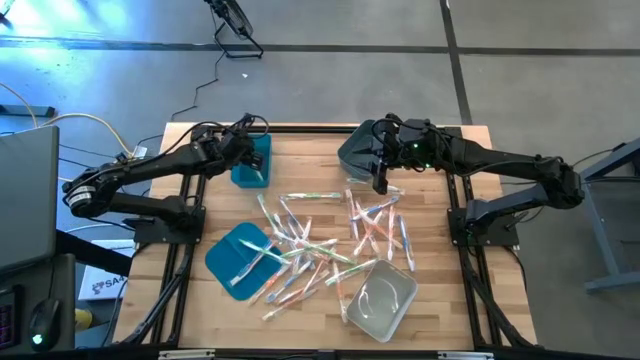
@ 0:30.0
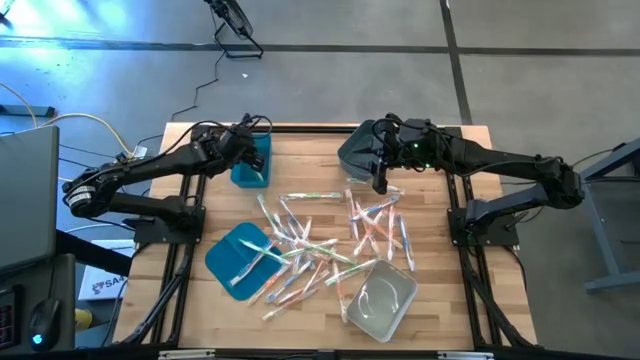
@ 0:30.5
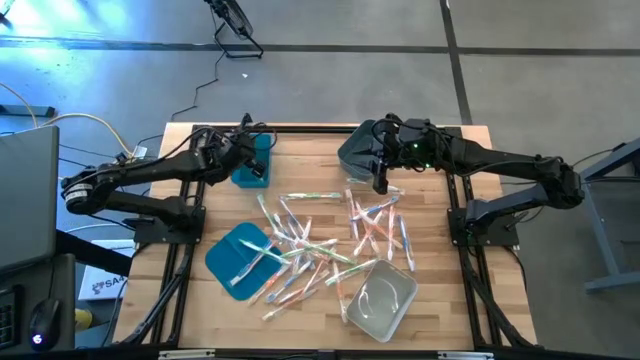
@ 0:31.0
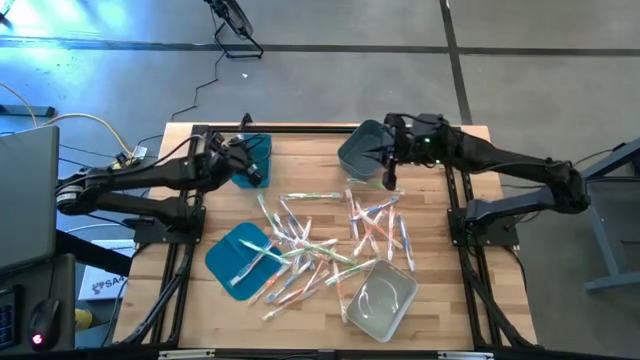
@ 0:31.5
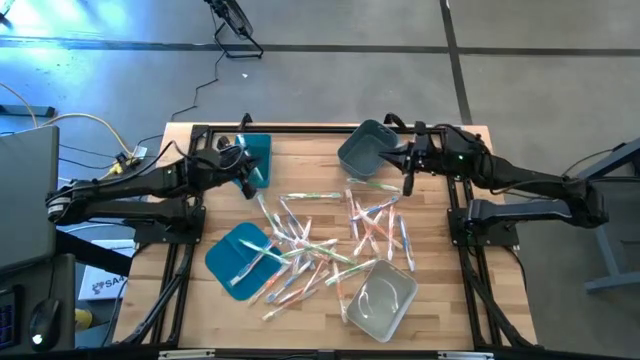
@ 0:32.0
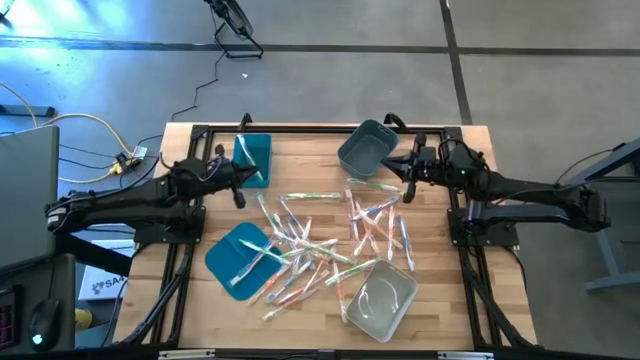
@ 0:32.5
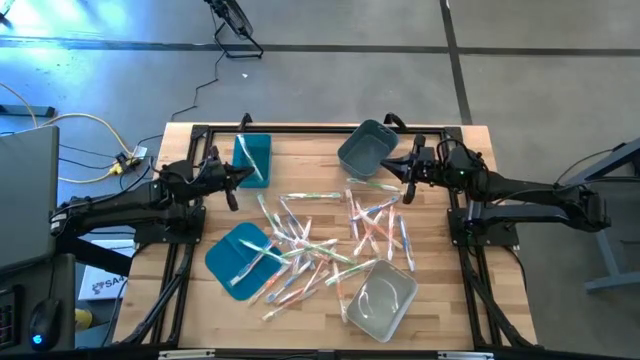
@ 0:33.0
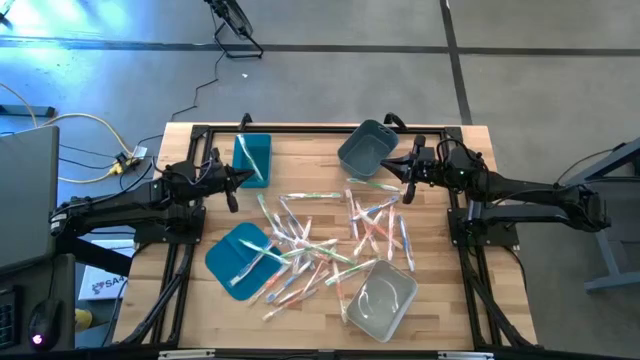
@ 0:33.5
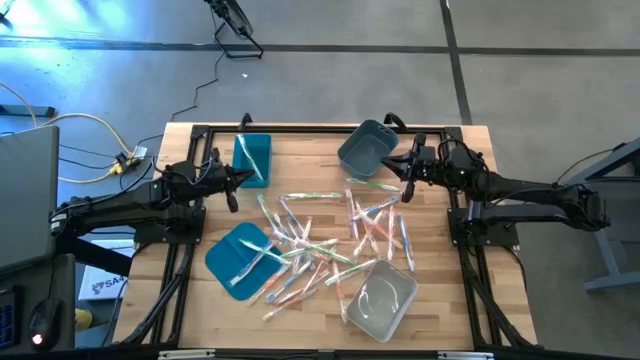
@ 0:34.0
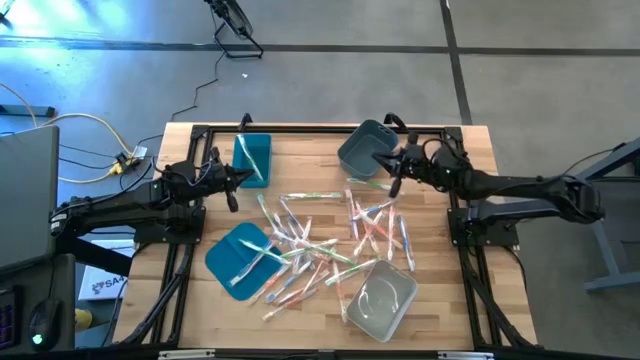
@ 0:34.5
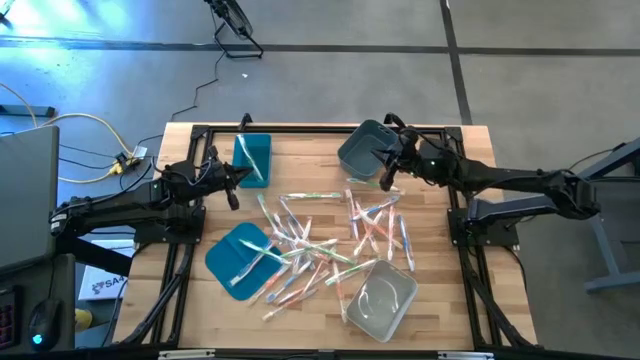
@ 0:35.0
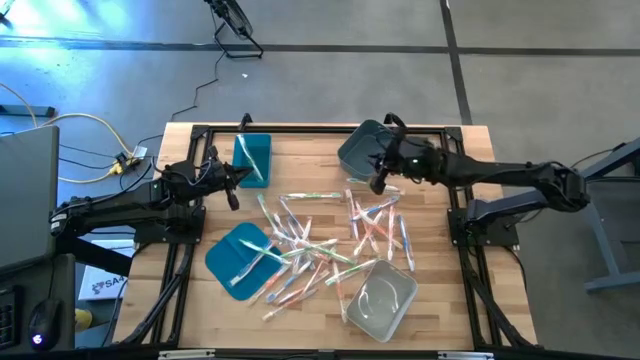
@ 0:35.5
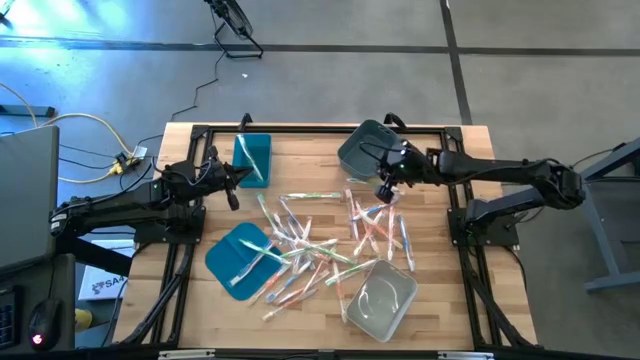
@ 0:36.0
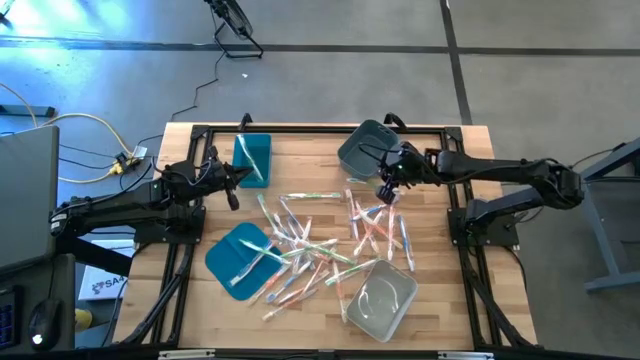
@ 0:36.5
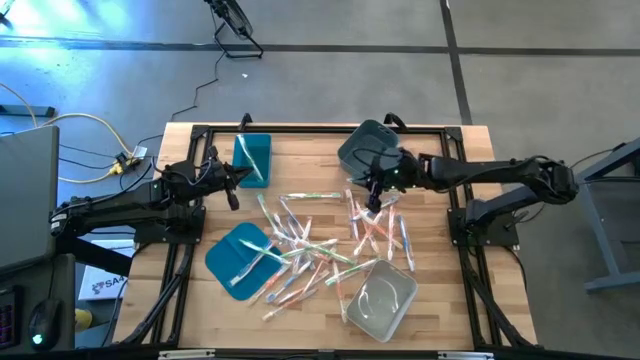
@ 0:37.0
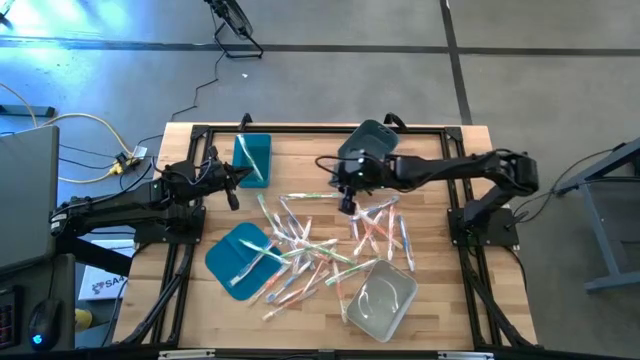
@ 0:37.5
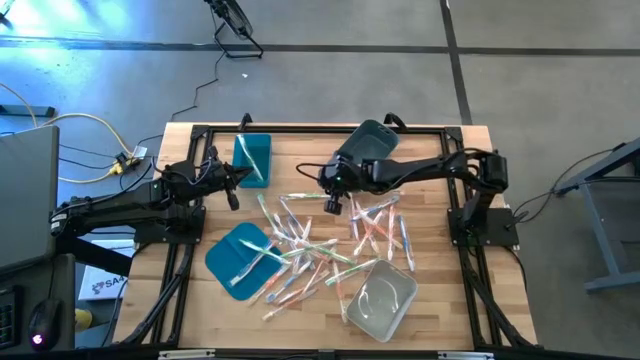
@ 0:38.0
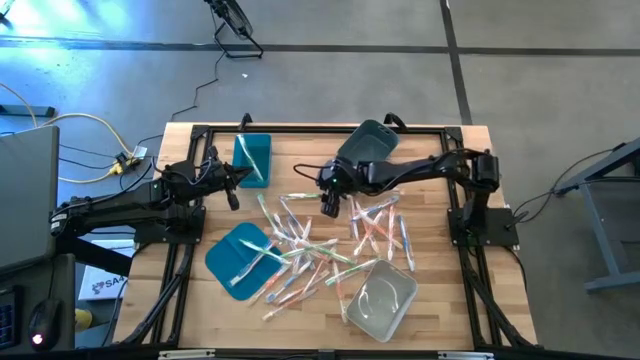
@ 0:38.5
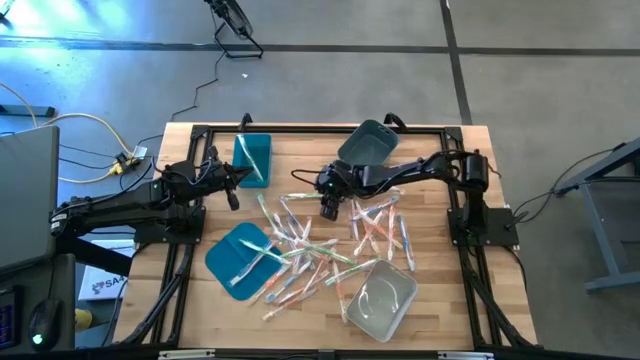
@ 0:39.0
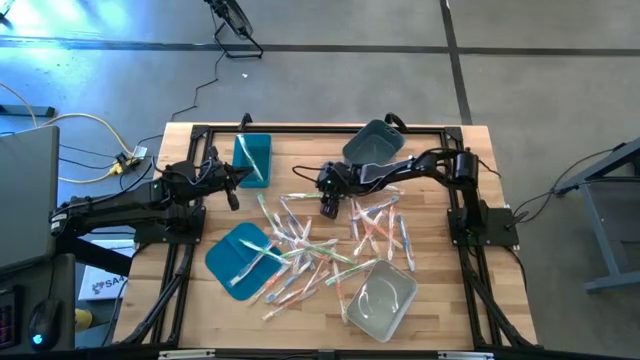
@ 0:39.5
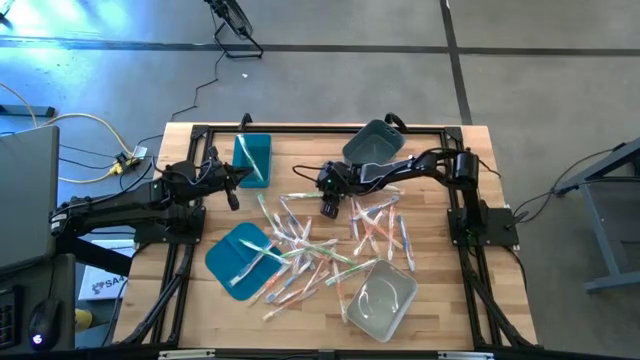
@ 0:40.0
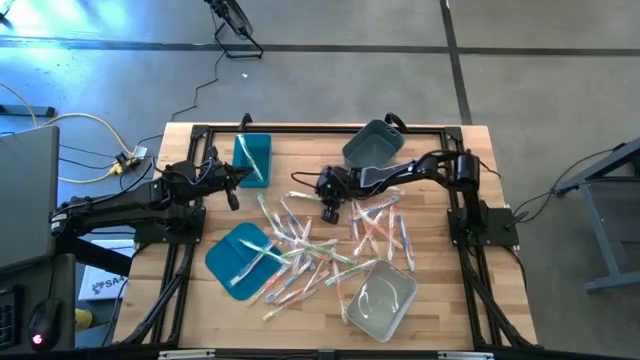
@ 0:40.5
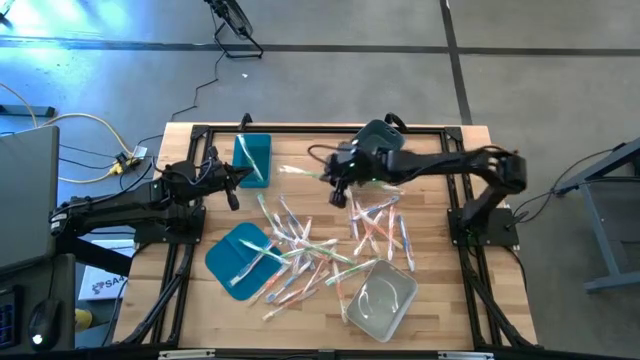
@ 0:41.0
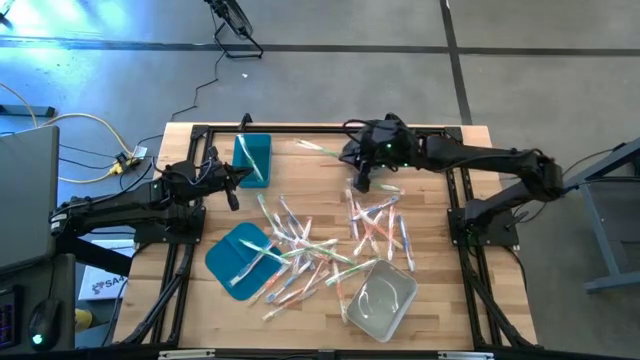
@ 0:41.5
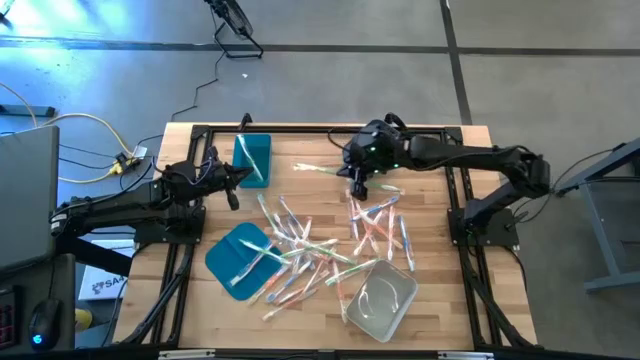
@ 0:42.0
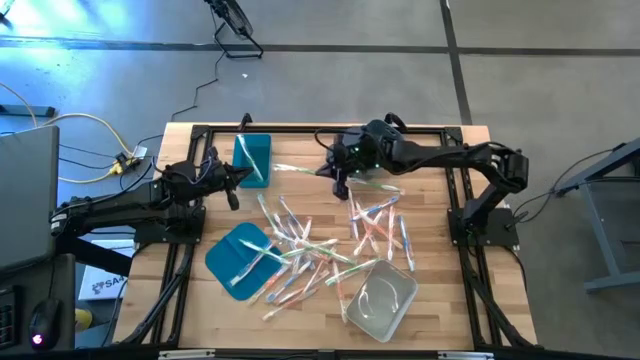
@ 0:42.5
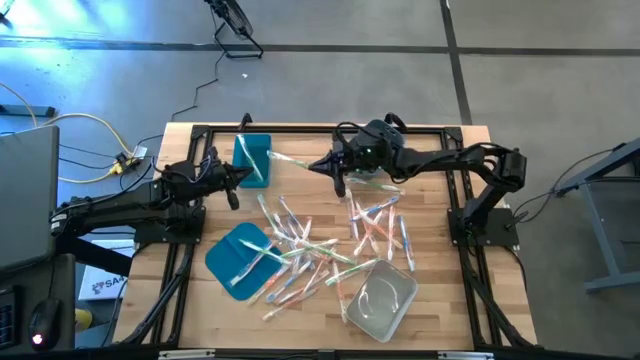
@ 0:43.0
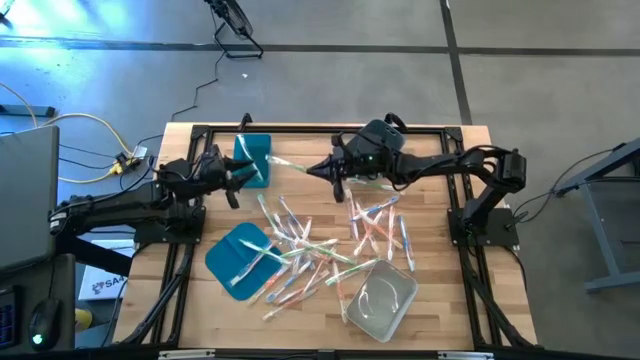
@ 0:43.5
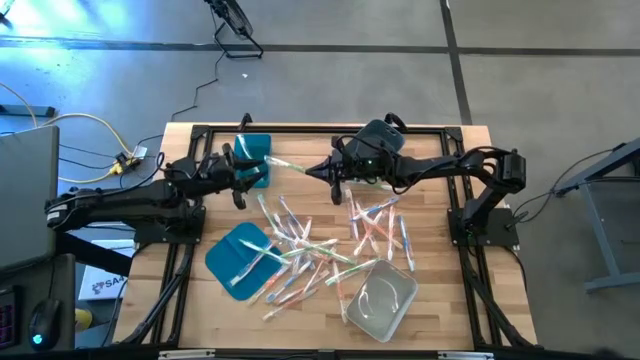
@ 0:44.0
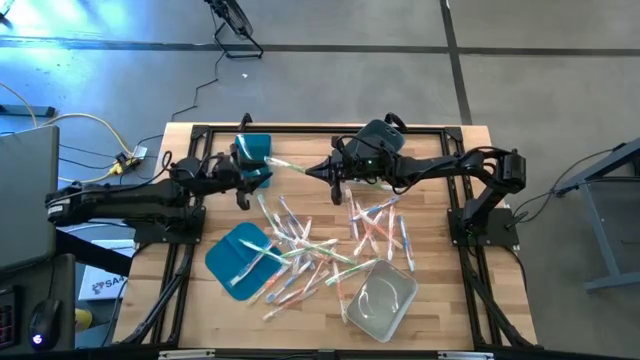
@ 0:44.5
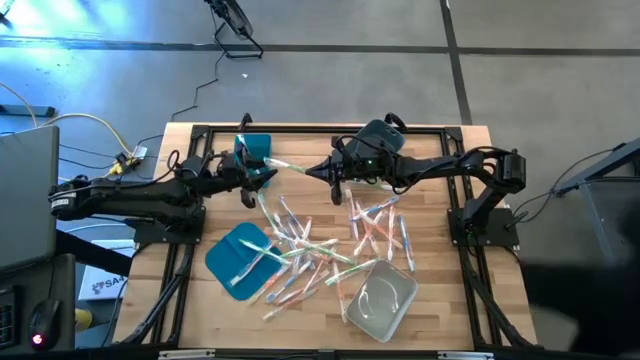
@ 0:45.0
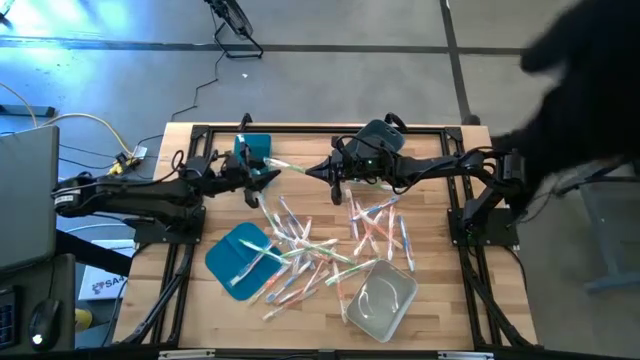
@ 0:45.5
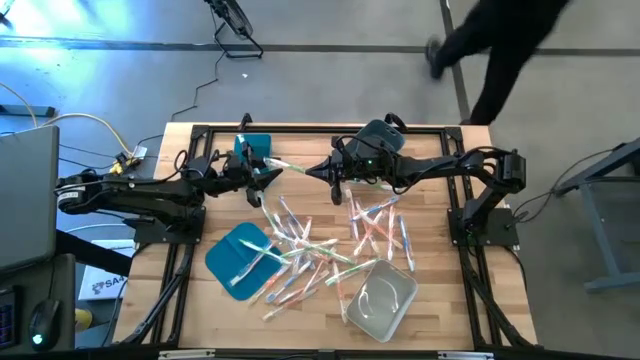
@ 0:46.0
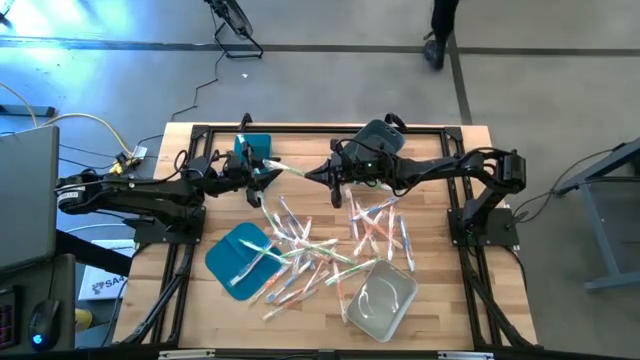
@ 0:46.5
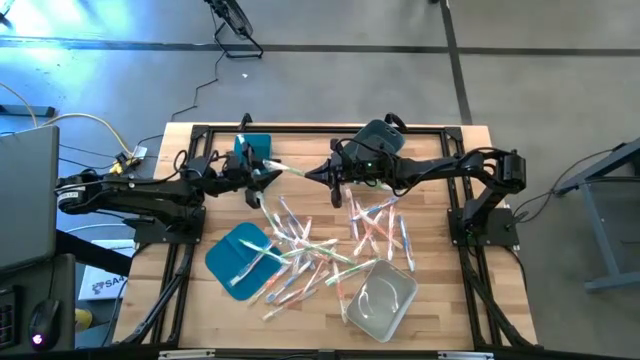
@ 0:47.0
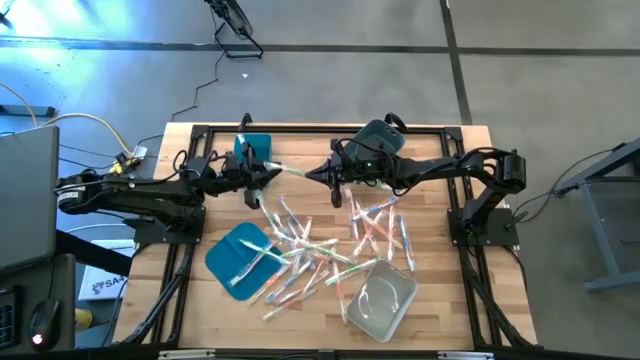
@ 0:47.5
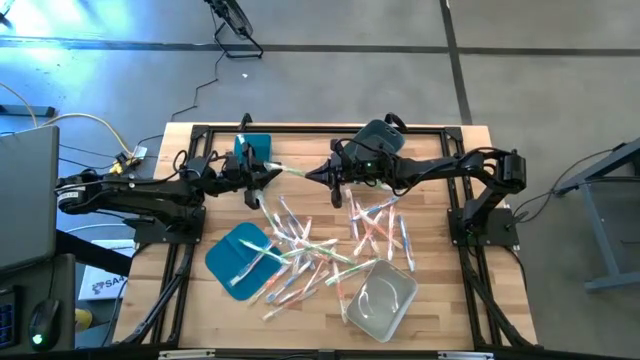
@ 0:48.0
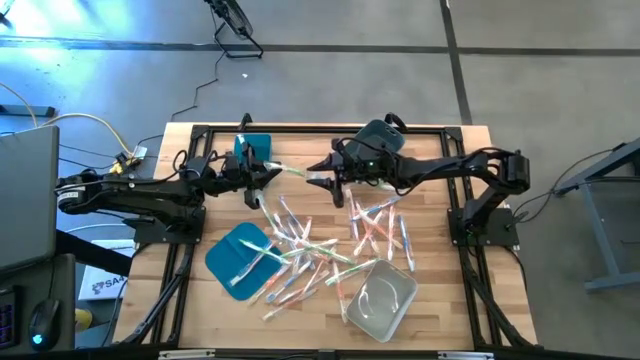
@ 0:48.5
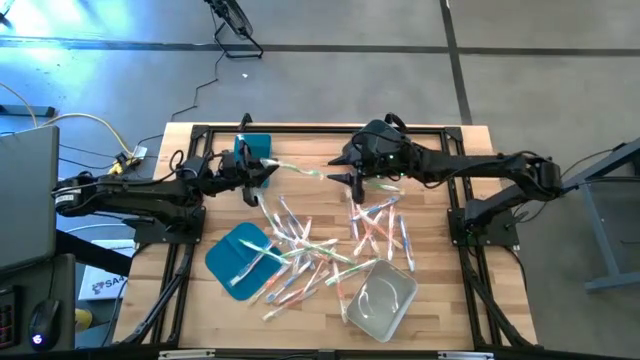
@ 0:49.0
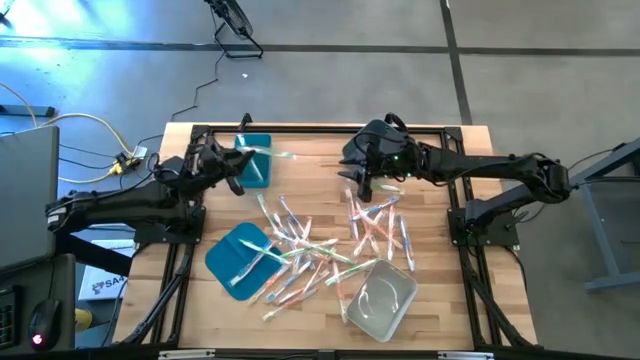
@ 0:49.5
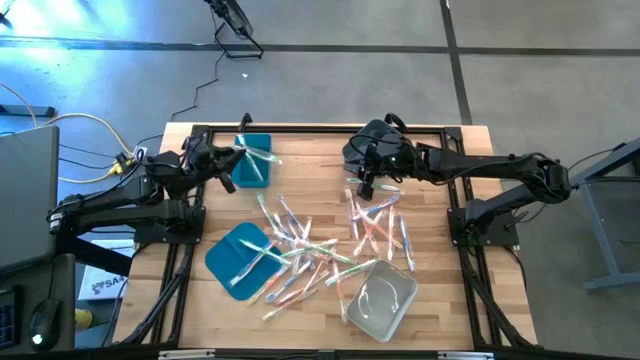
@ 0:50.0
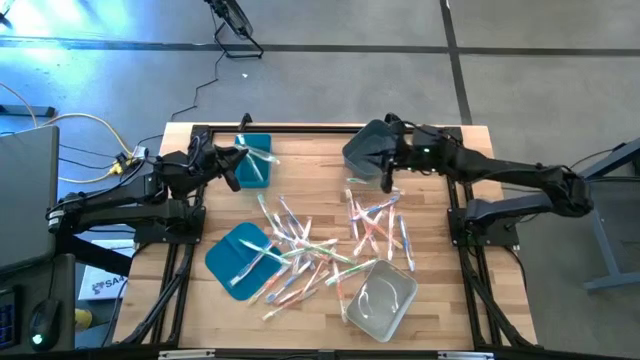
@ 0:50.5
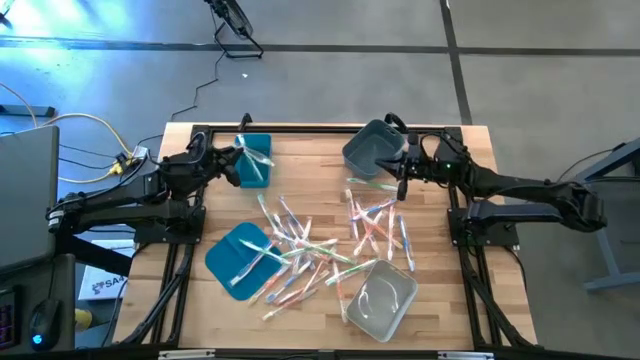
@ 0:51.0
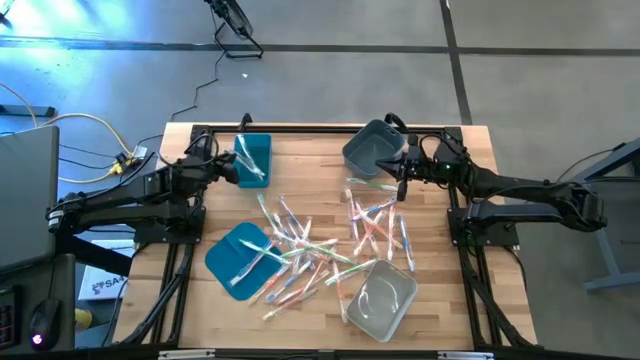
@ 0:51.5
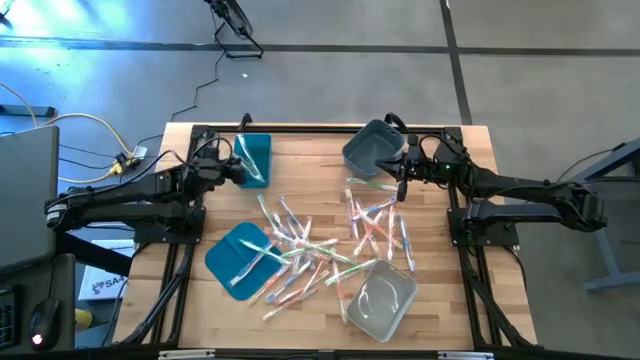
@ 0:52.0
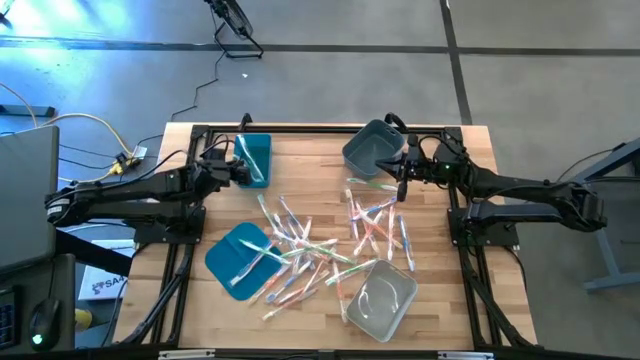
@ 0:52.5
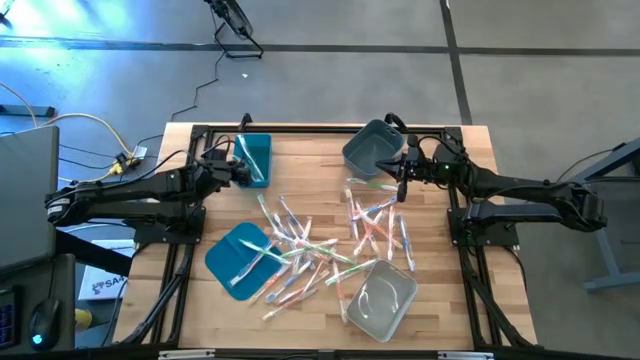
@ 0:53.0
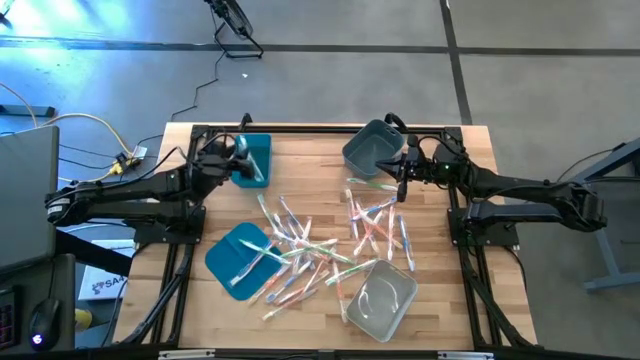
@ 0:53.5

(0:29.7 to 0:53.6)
Task: Pick & Place Toothbrushes
Put the green toothbrush into the blue bin
